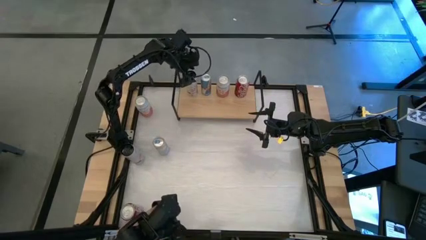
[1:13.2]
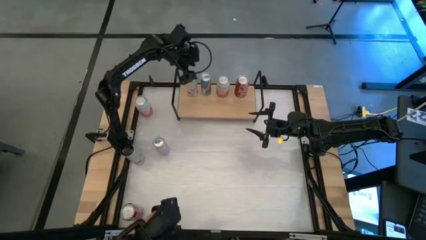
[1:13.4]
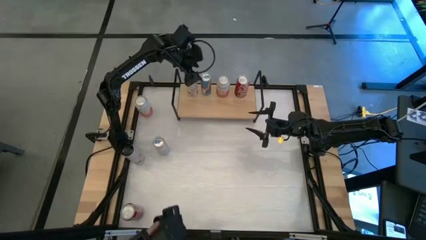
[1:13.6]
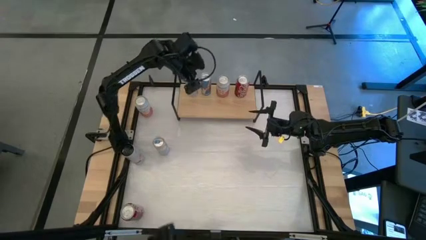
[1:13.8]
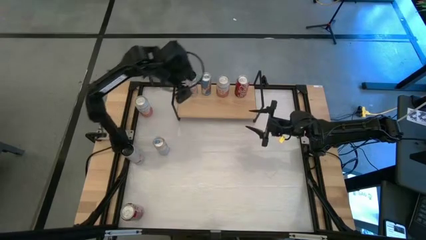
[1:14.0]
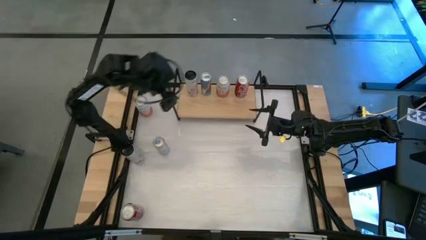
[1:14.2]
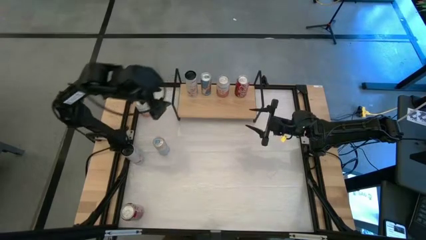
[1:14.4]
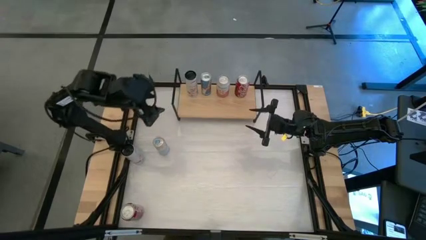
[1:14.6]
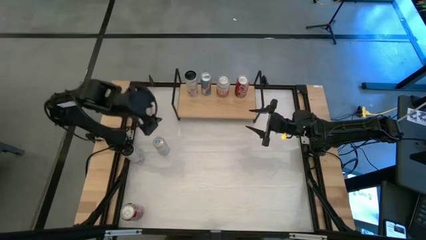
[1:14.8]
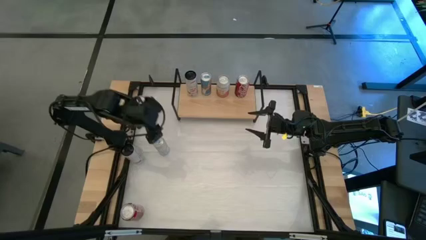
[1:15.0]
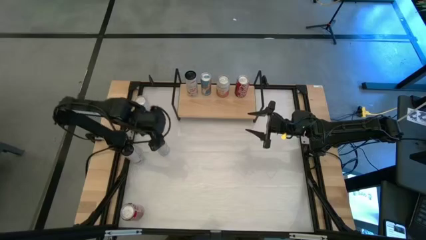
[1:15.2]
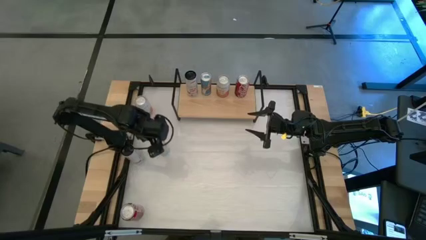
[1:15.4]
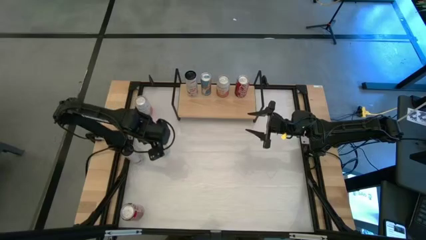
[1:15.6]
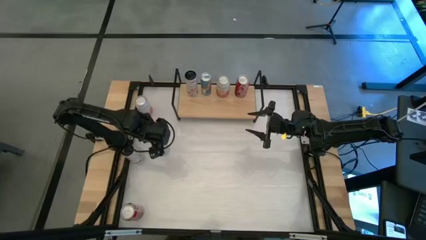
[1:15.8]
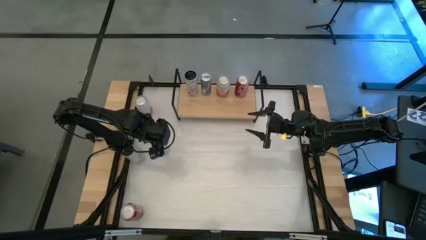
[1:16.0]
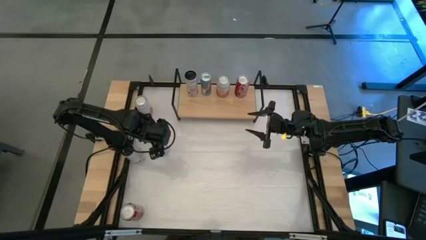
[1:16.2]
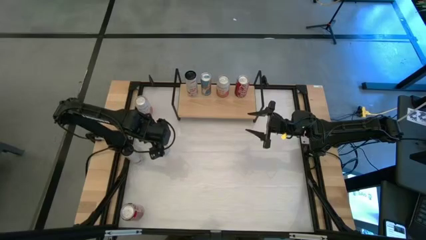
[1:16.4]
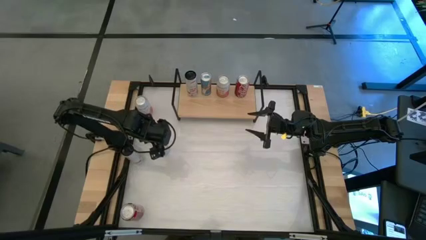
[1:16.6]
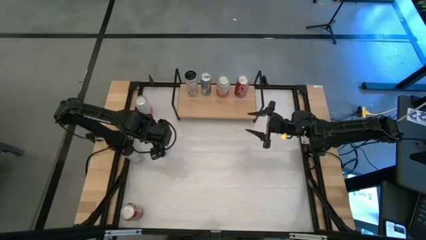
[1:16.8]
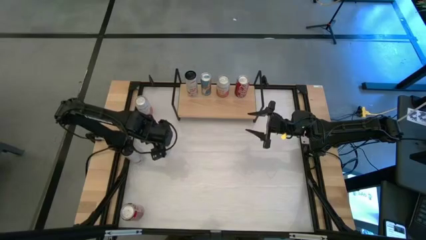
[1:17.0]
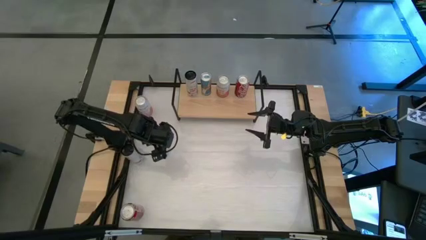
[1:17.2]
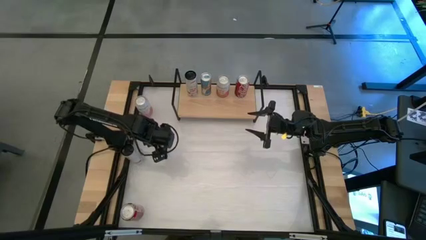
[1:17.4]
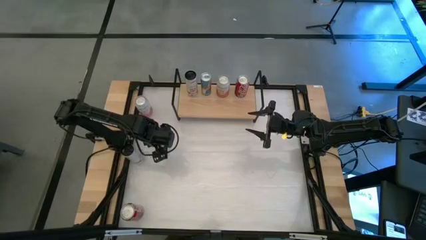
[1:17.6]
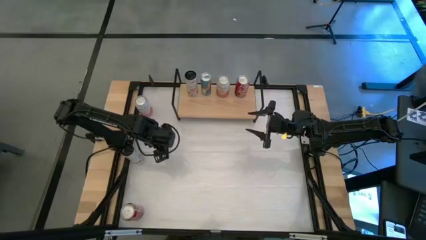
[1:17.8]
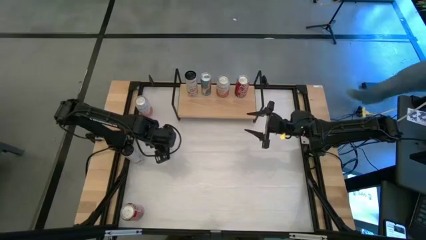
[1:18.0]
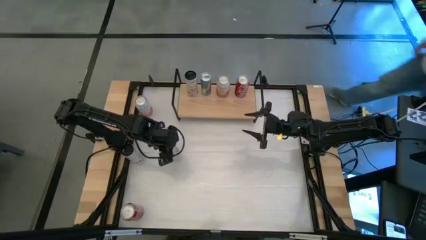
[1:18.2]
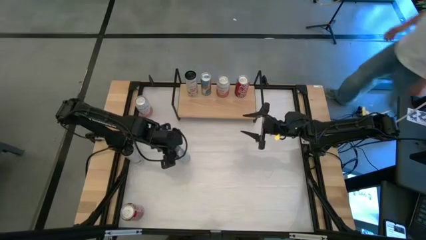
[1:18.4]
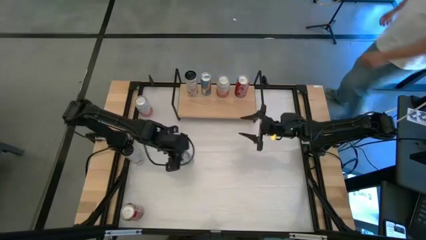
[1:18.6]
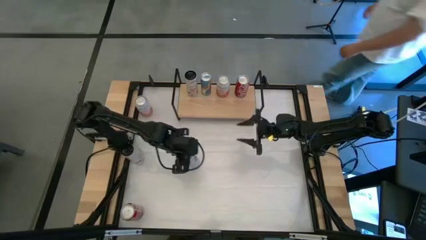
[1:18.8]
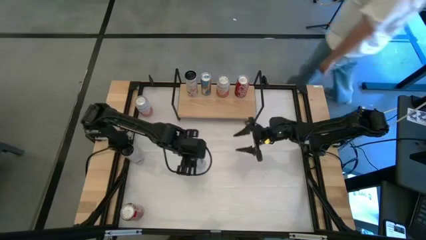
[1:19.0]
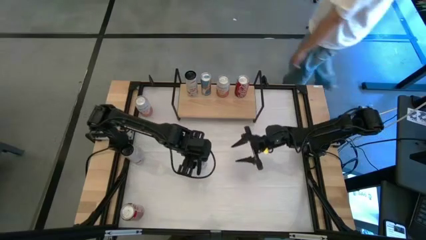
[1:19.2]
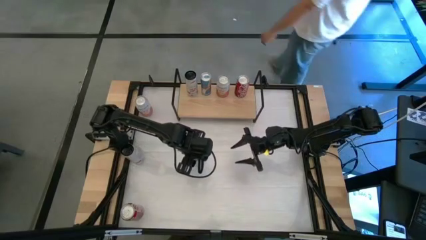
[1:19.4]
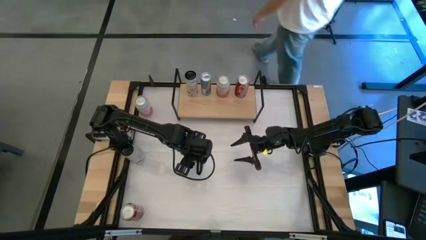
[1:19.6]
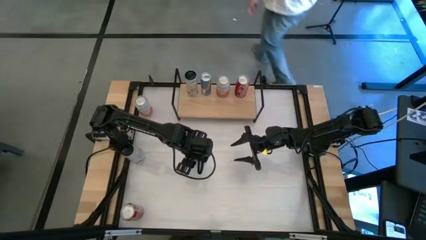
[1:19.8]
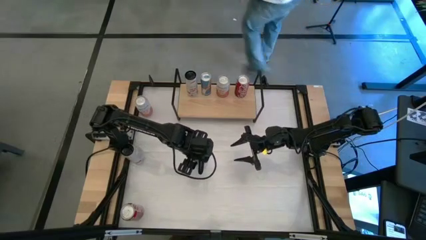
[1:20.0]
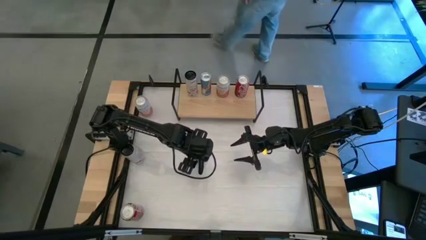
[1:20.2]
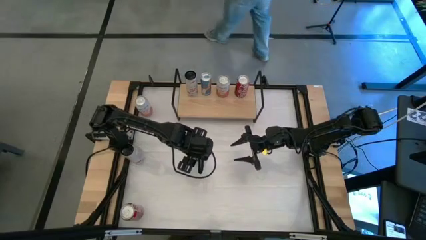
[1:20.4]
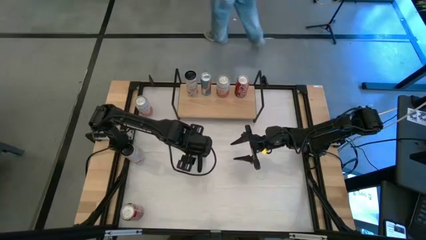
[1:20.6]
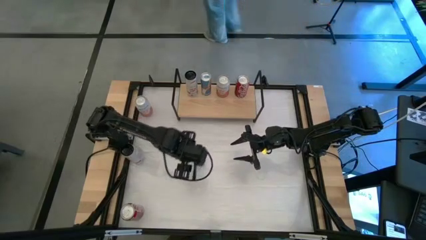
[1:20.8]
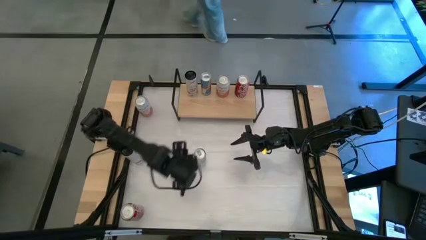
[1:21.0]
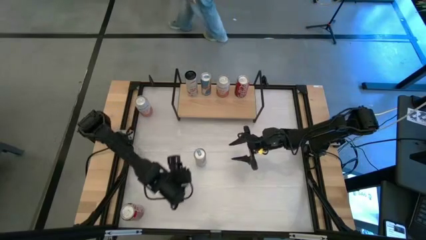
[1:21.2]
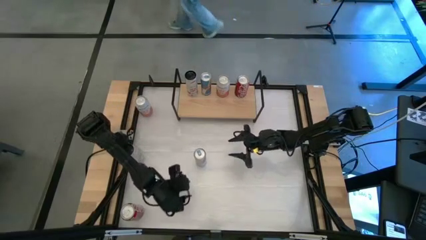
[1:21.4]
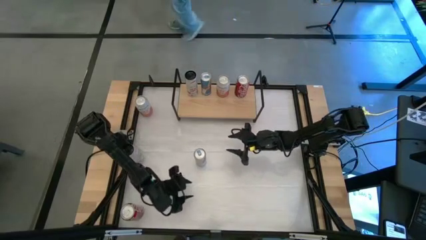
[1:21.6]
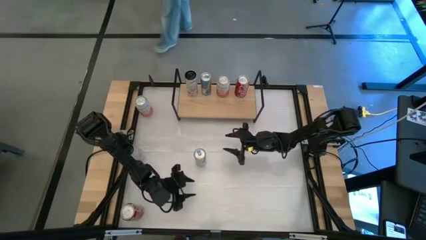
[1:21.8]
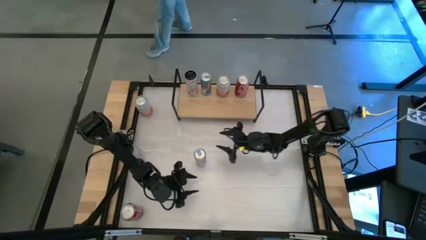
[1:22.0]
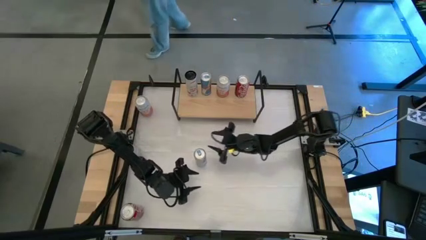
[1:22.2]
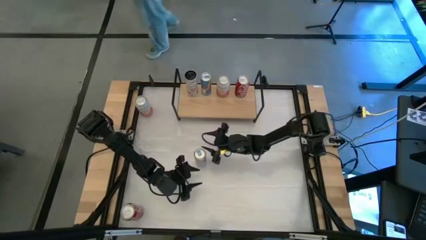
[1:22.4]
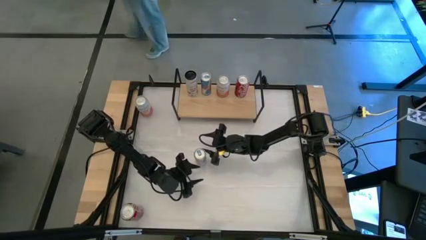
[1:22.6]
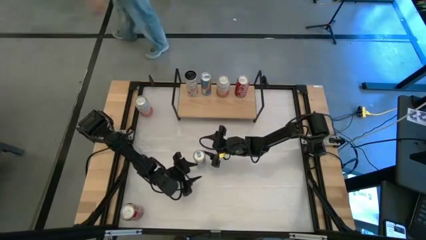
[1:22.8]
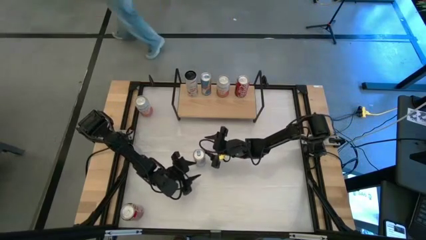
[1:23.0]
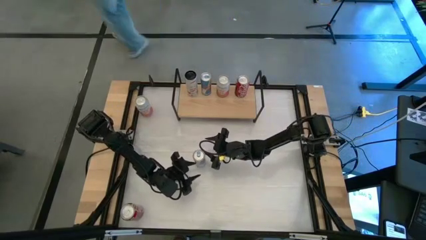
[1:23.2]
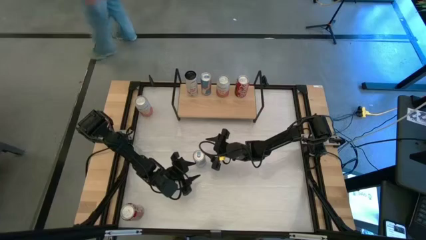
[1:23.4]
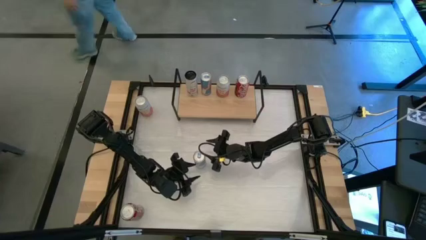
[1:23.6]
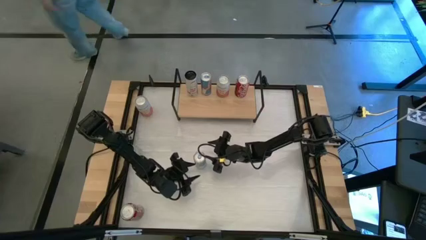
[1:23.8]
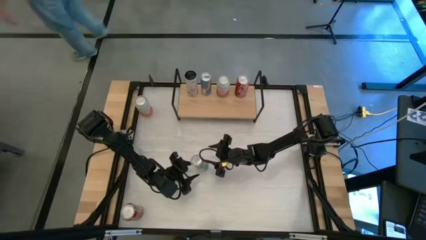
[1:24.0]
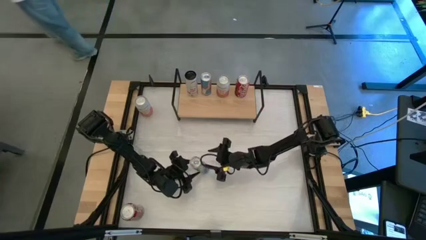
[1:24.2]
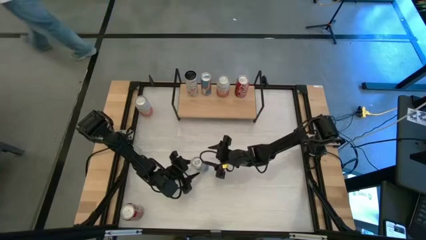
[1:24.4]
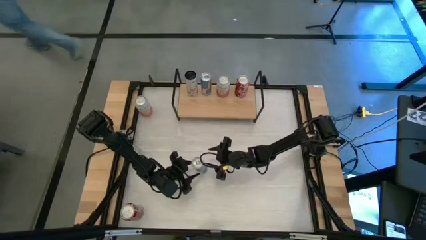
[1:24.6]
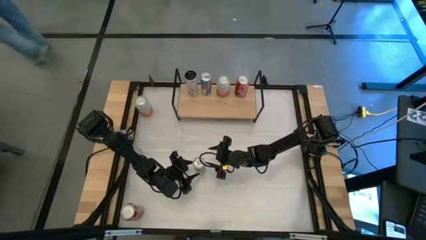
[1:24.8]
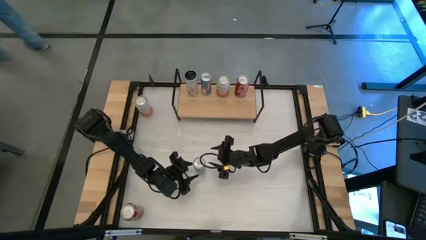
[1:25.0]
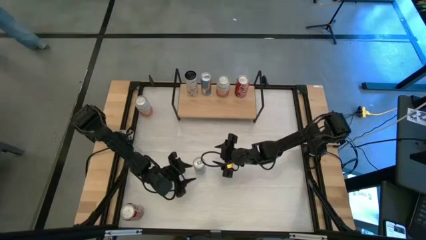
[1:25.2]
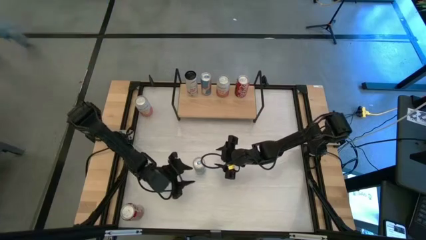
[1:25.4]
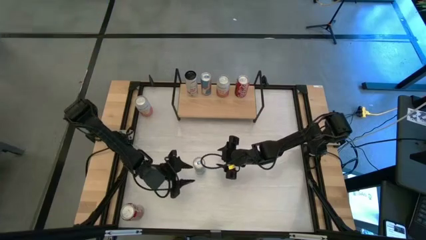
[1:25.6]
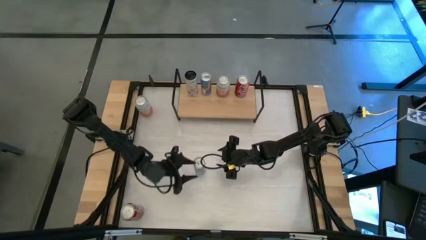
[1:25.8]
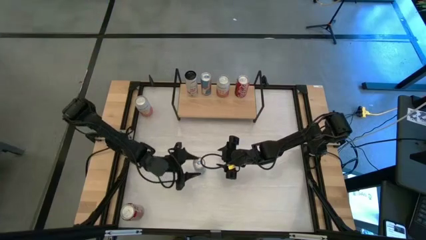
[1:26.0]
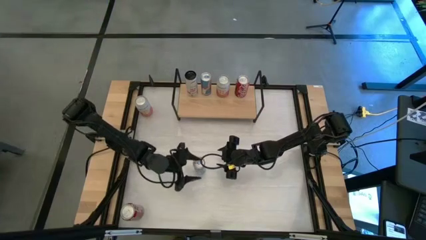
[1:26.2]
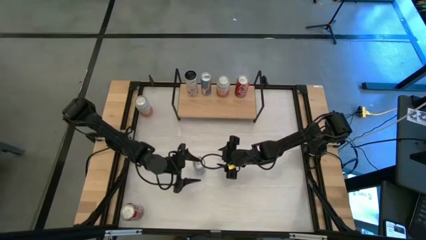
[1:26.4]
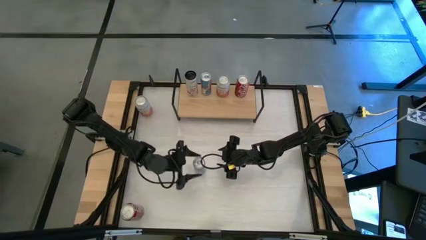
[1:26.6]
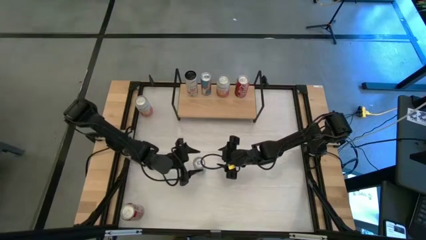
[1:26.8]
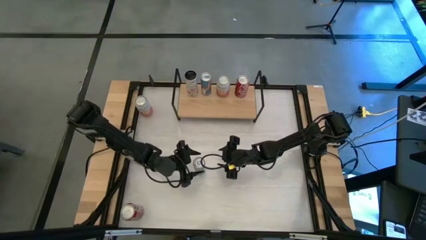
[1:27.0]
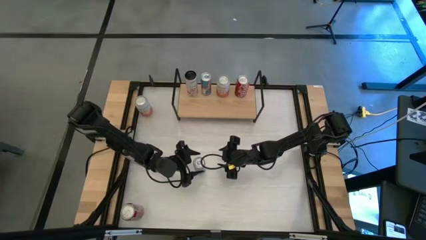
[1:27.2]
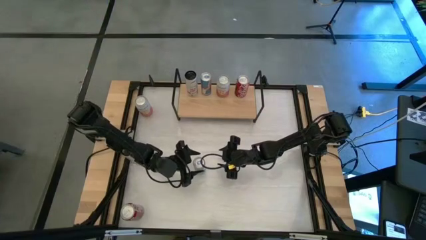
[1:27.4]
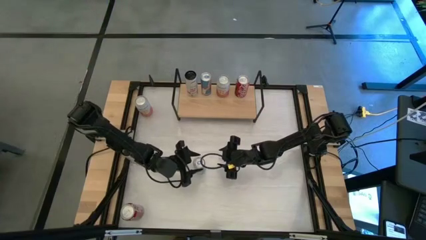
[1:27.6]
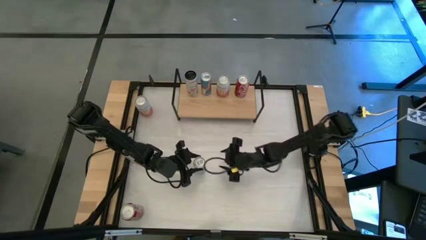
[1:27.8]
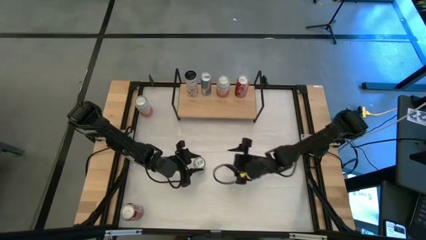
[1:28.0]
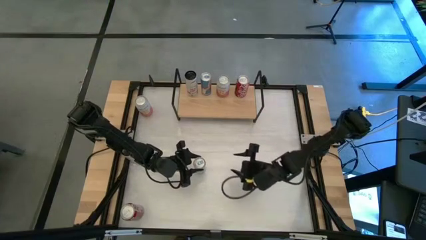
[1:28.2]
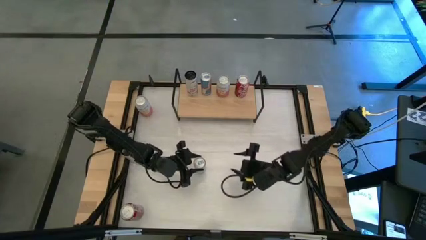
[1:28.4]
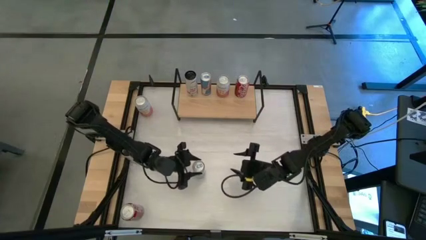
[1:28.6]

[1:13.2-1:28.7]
Task: Place canned beverage on shelf
Move the blue soda can to the center of the table
